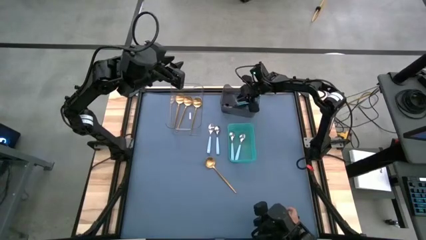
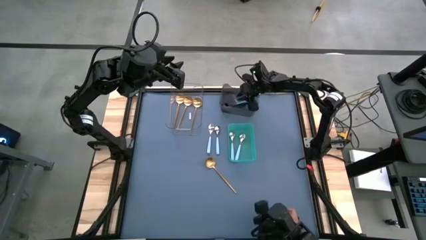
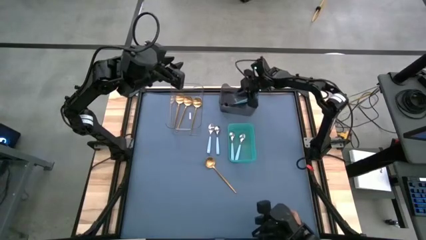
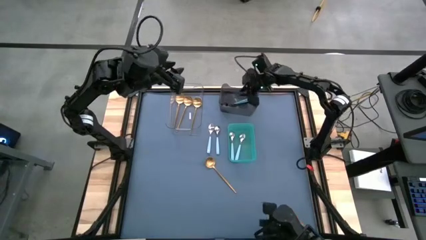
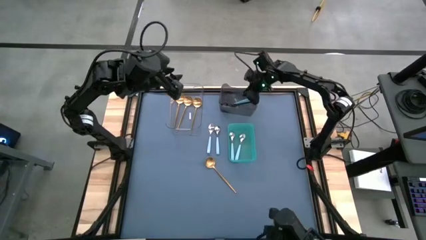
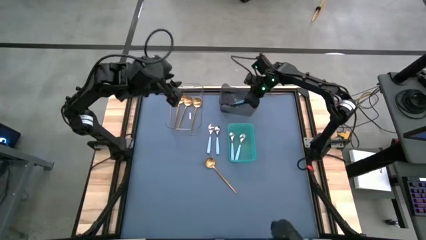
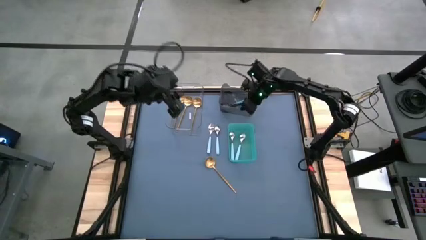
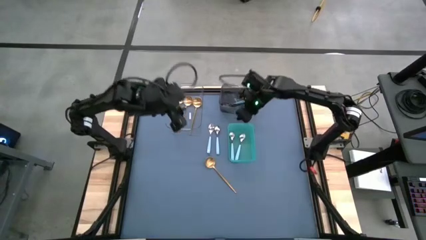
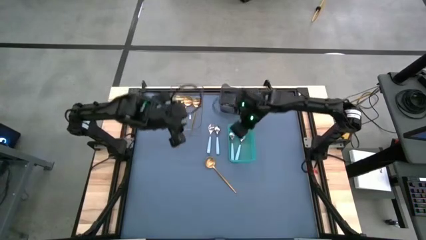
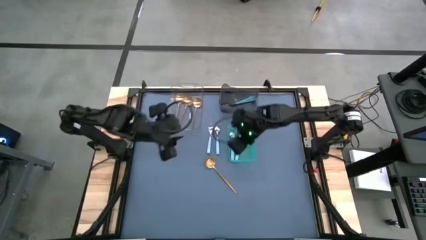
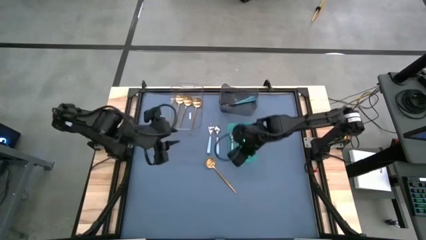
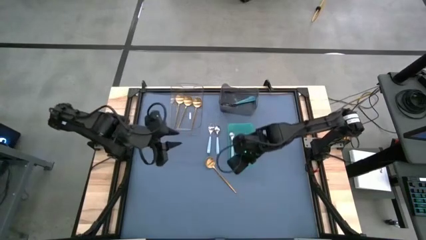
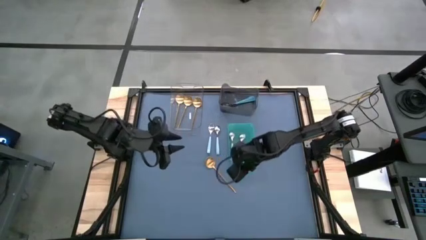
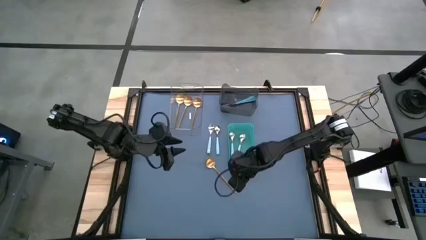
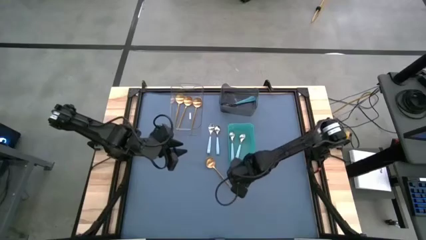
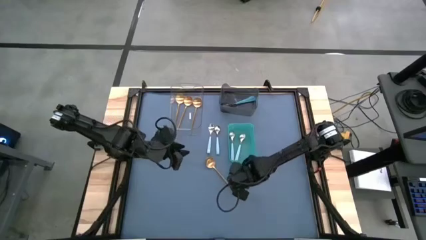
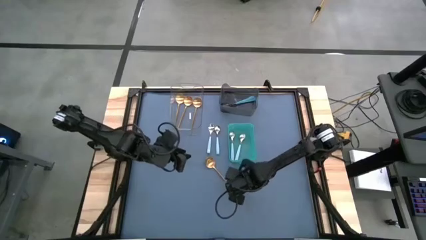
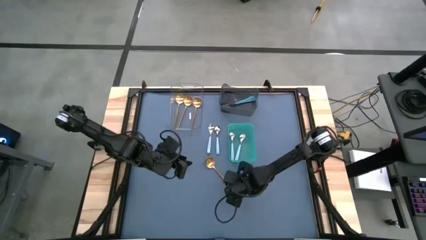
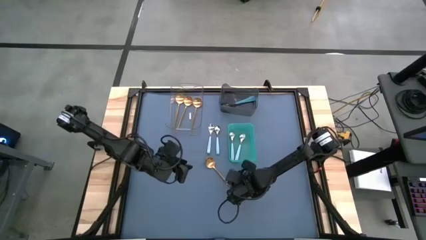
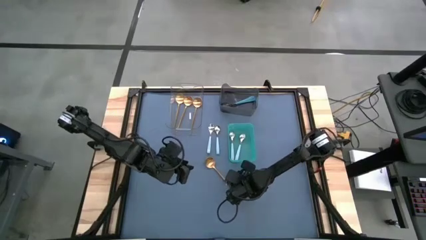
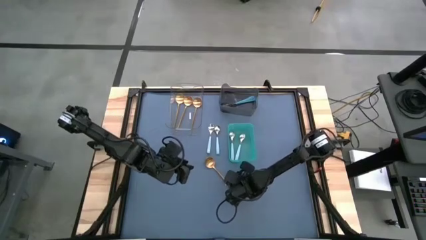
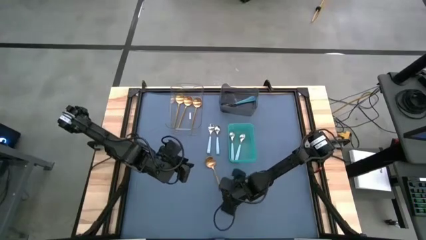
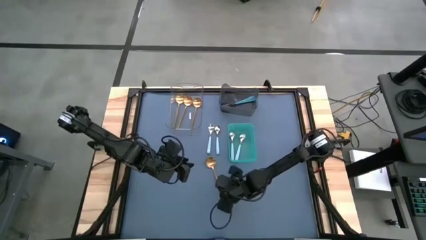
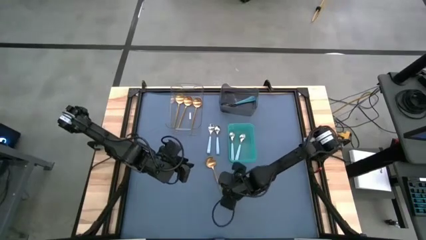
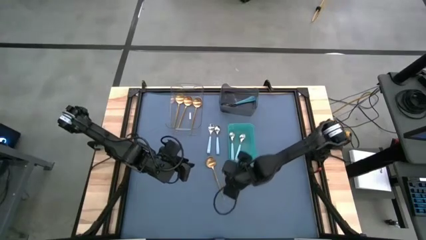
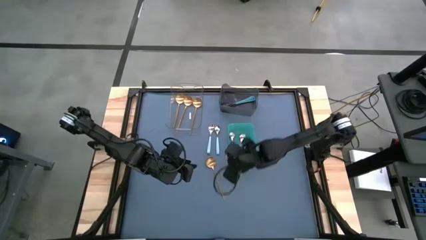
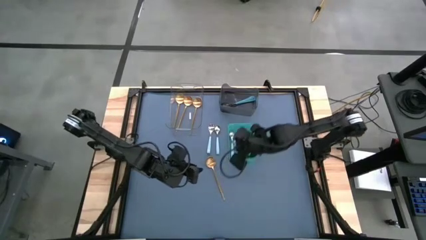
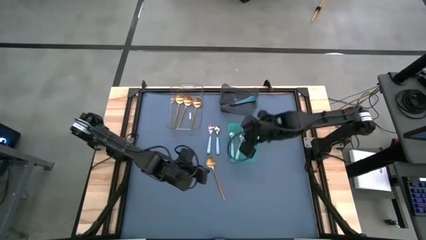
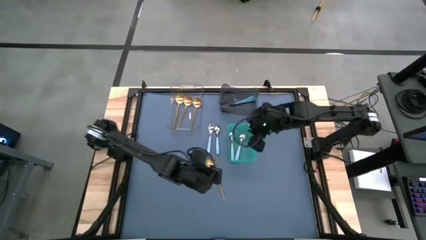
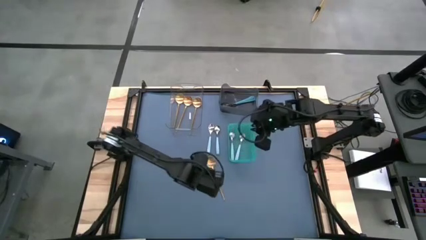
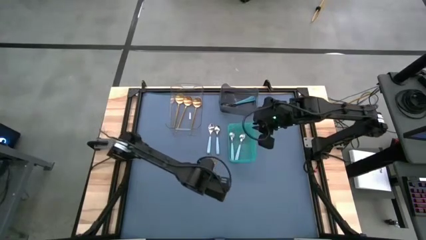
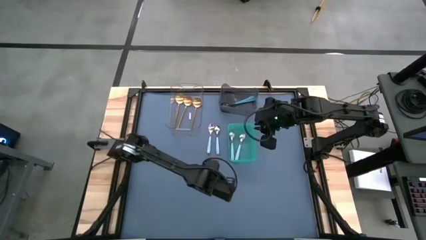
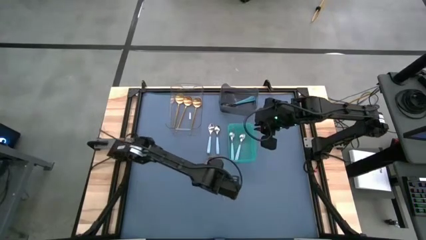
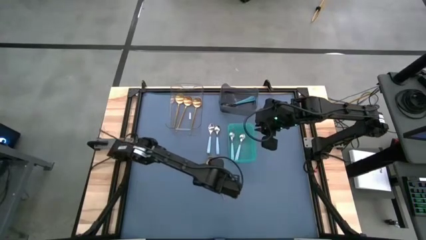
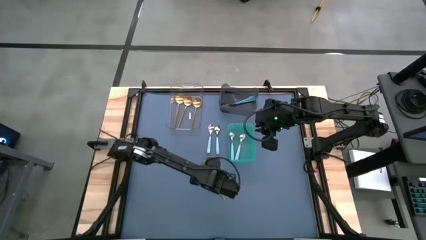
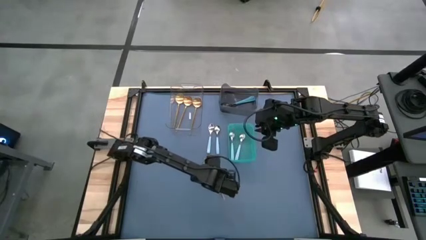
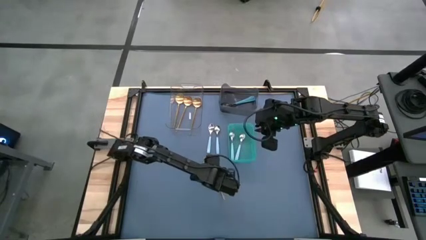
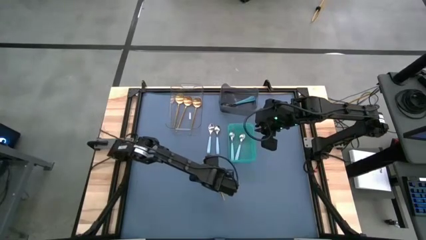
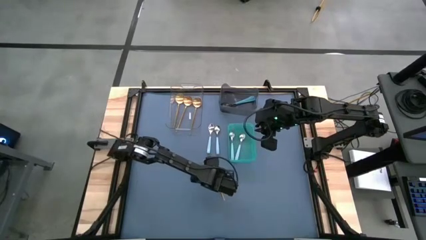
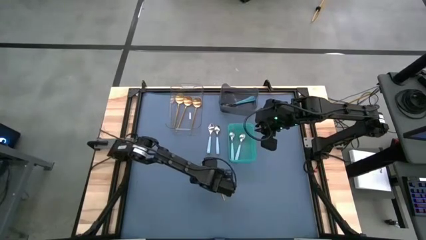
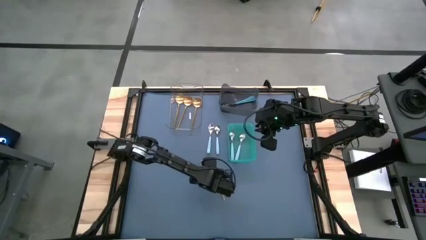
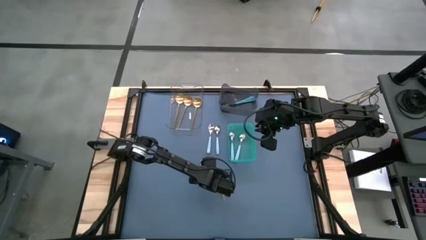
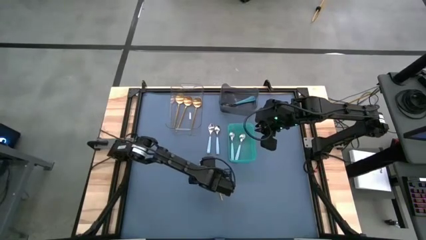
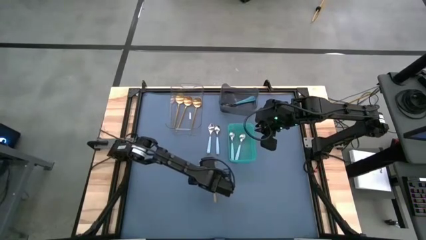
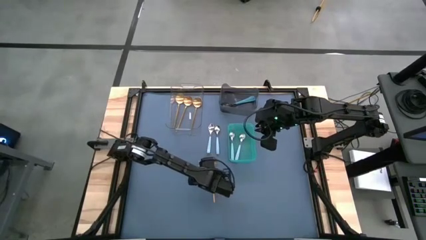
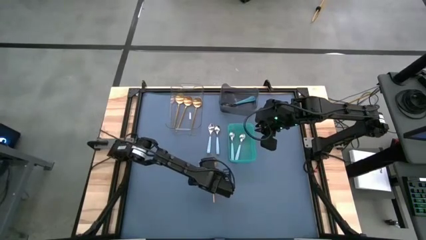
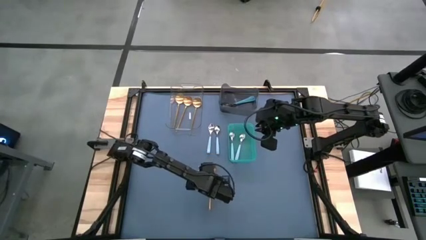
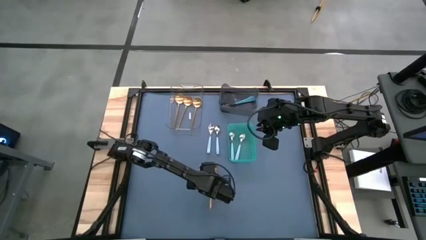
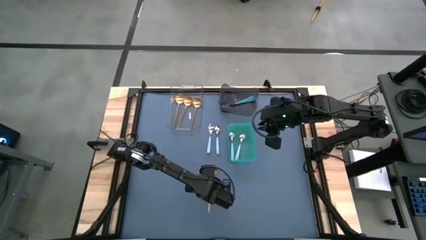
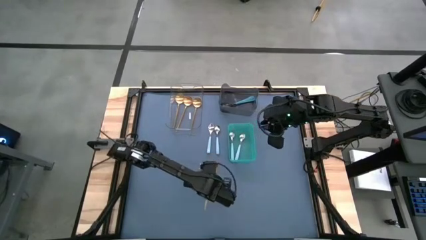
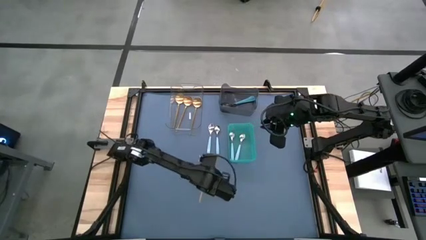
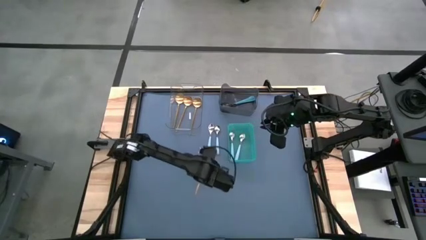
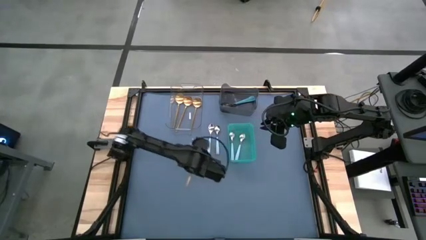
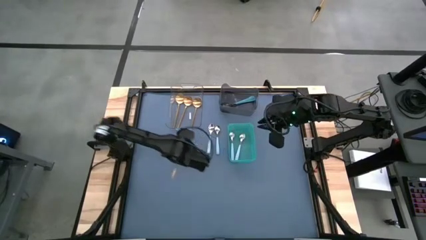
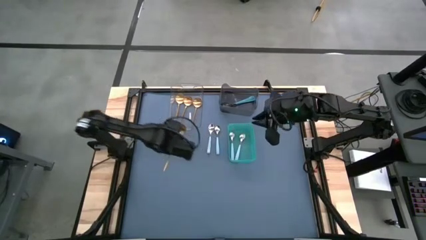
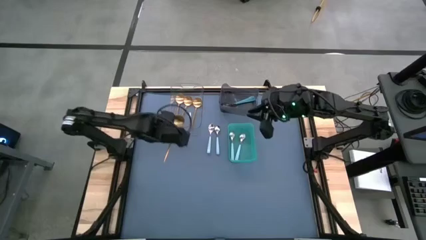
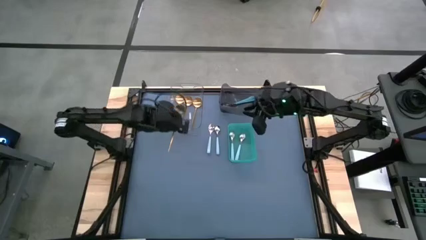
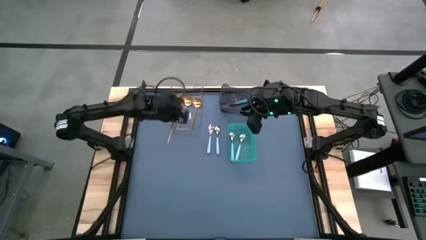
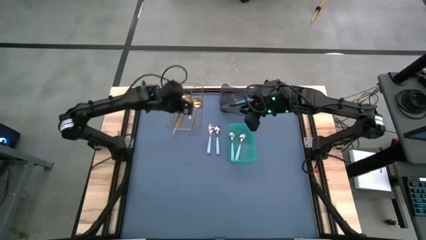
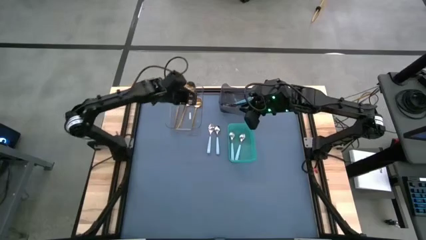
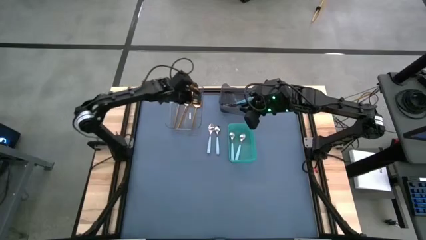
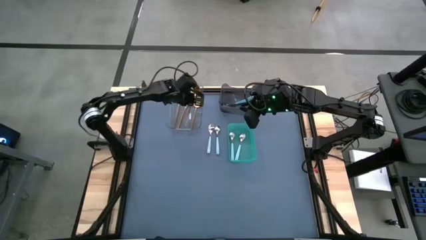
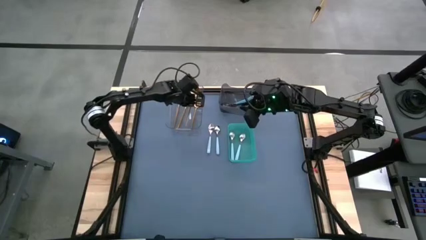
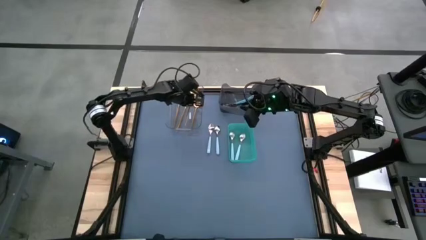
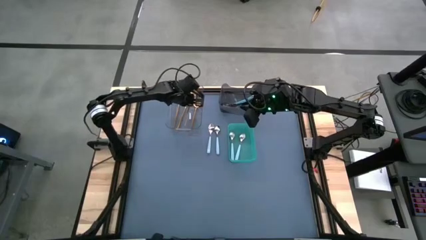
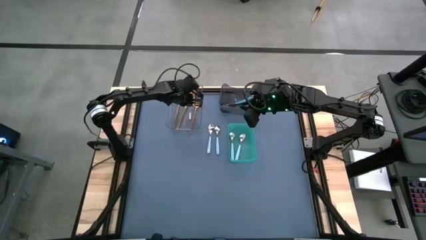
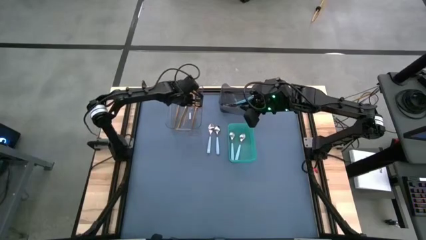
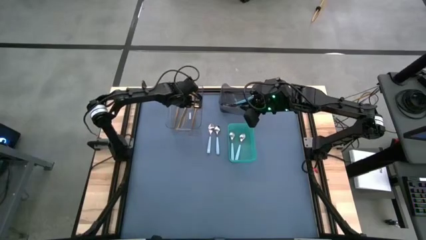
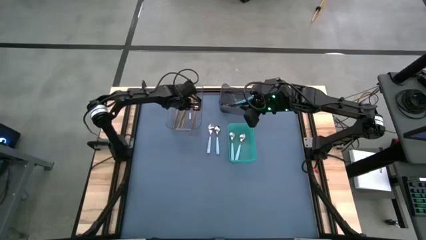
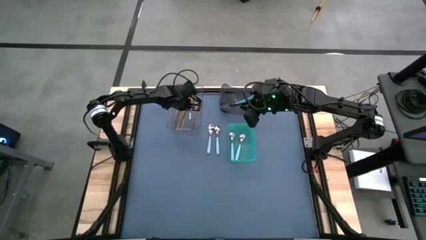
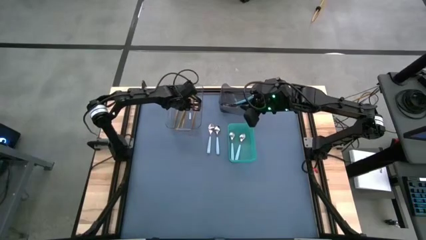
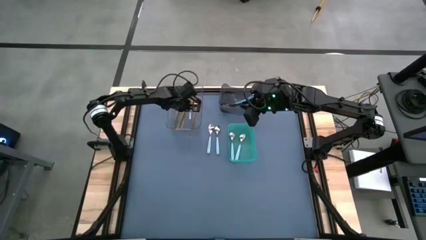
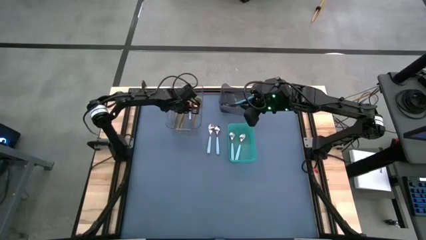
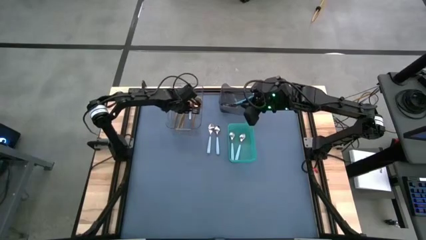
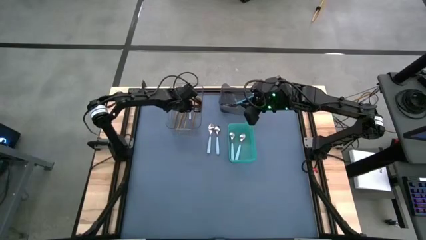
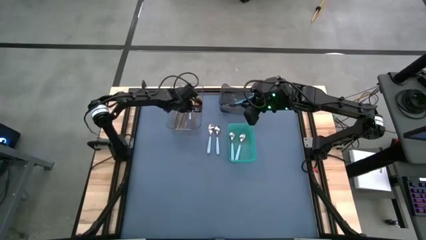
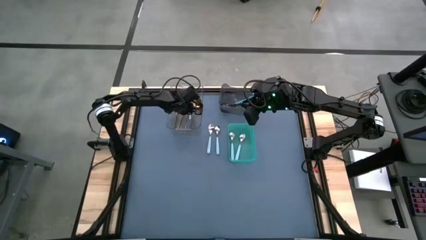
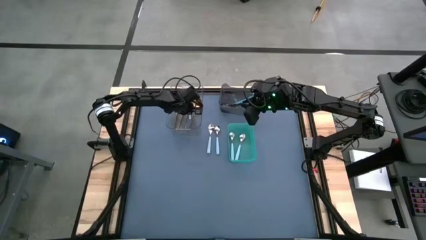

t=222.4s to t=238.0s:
Task: Sort silverware by color (type)
Put the gold spoon into the transparent bin
